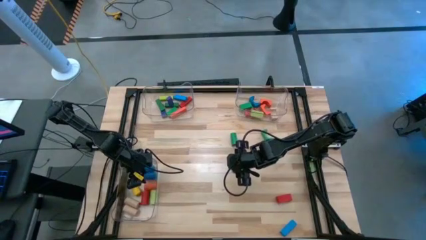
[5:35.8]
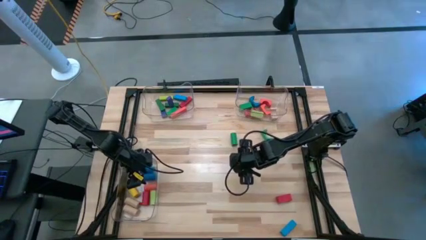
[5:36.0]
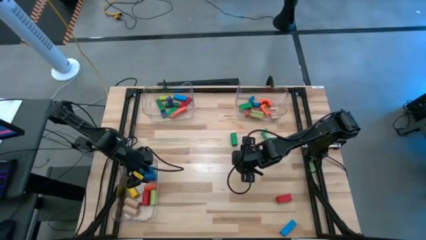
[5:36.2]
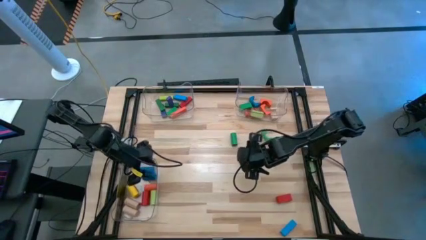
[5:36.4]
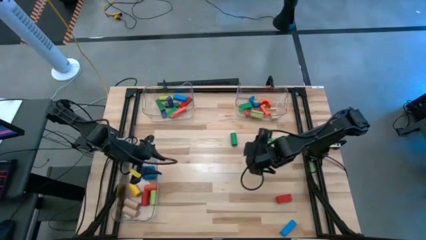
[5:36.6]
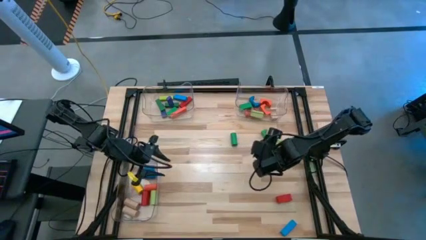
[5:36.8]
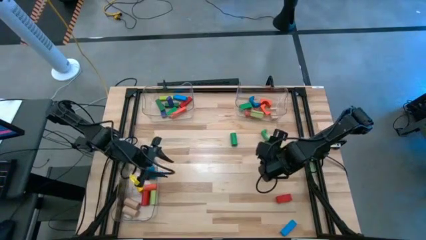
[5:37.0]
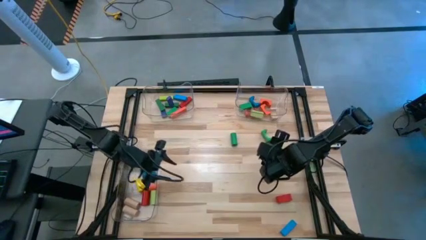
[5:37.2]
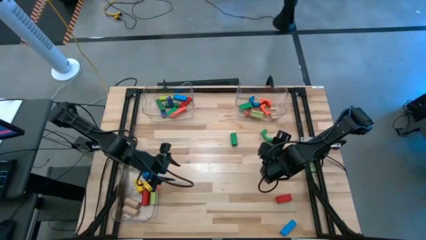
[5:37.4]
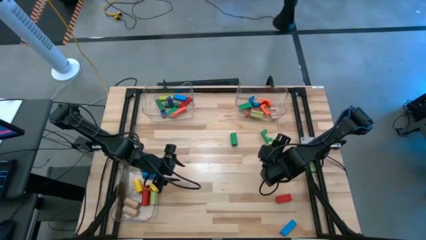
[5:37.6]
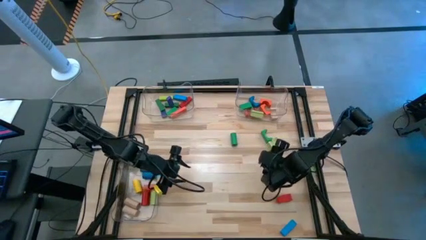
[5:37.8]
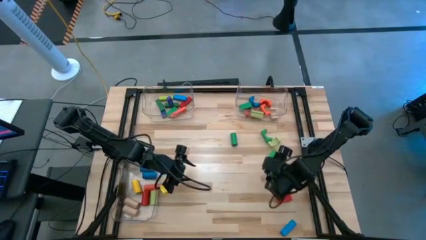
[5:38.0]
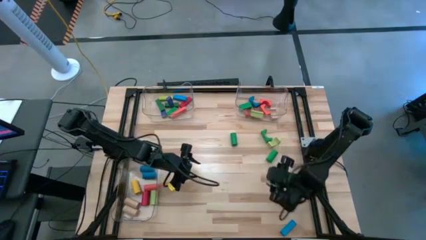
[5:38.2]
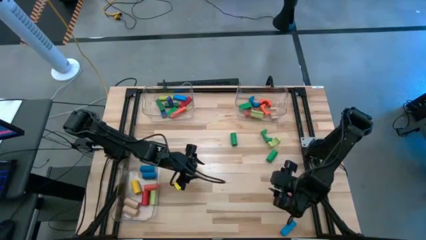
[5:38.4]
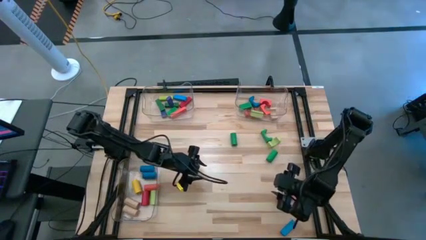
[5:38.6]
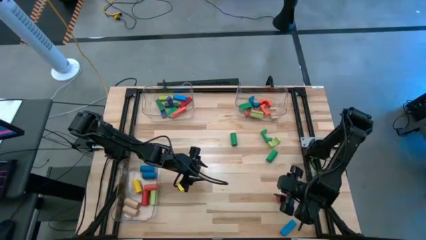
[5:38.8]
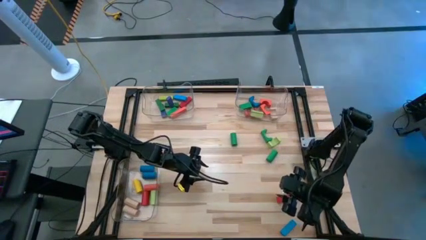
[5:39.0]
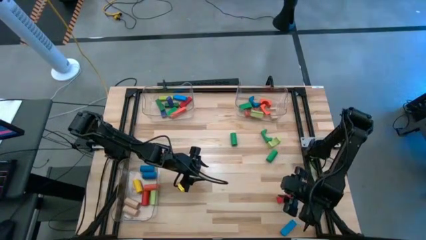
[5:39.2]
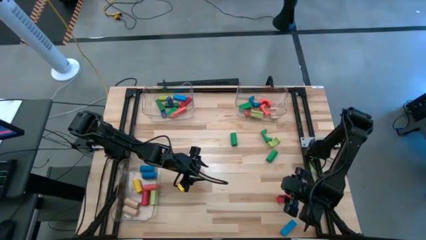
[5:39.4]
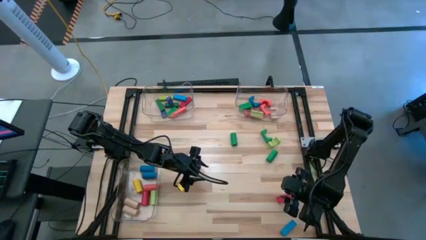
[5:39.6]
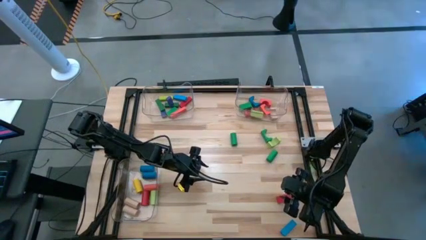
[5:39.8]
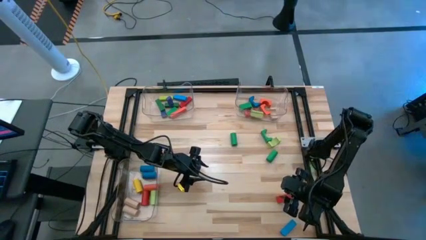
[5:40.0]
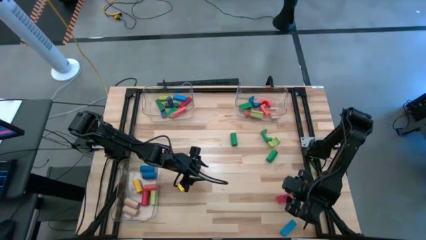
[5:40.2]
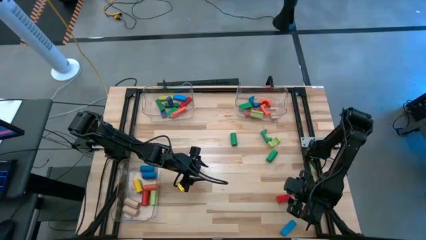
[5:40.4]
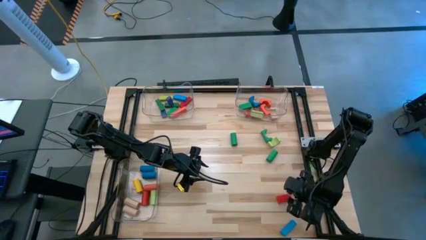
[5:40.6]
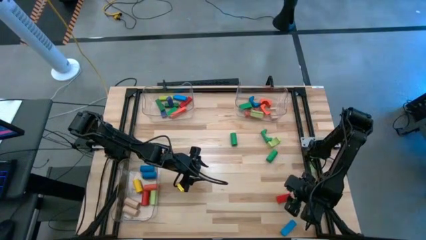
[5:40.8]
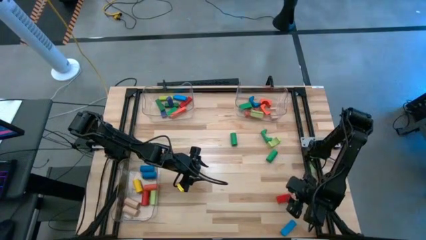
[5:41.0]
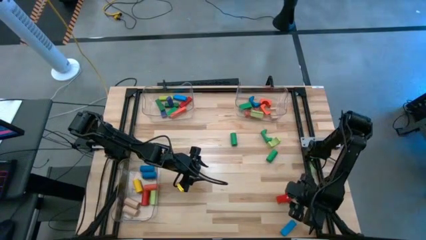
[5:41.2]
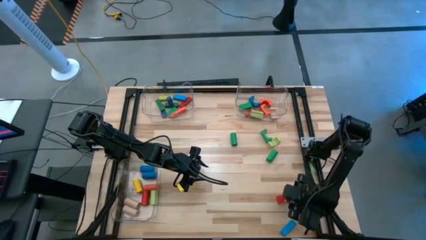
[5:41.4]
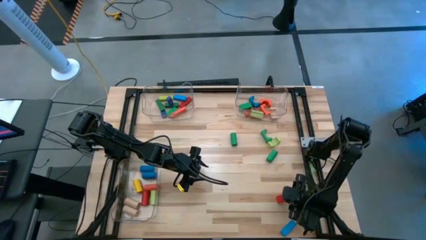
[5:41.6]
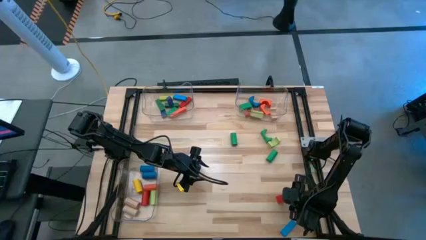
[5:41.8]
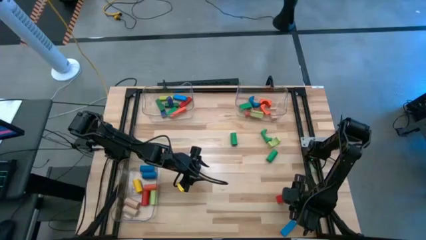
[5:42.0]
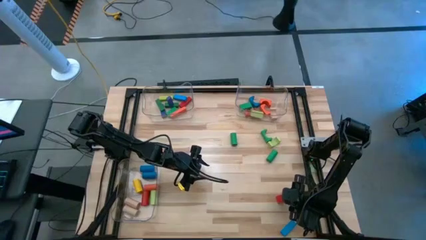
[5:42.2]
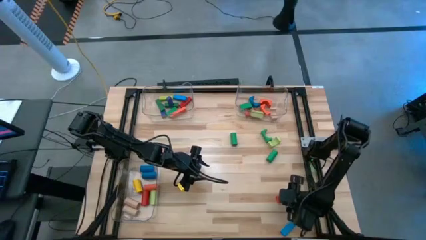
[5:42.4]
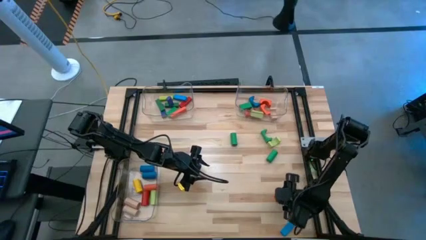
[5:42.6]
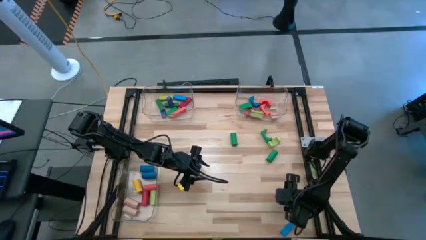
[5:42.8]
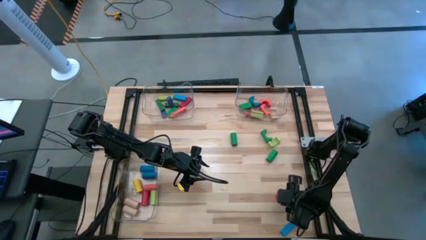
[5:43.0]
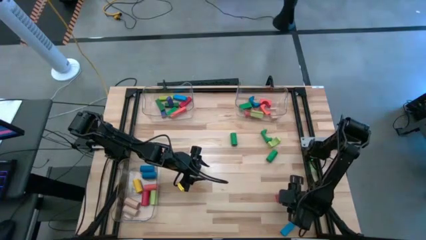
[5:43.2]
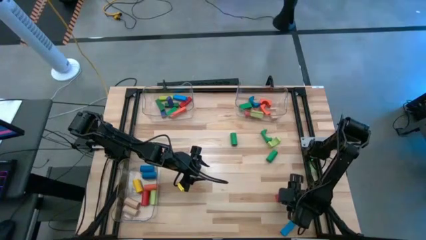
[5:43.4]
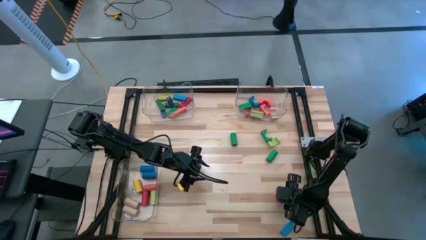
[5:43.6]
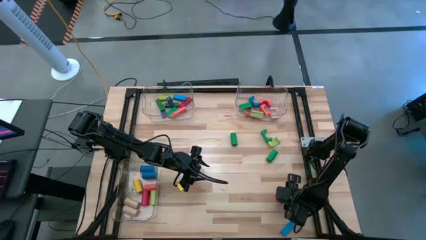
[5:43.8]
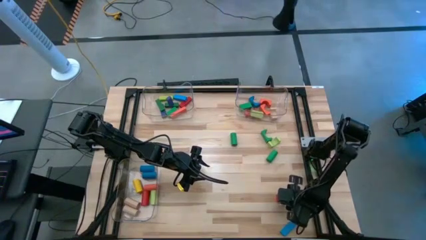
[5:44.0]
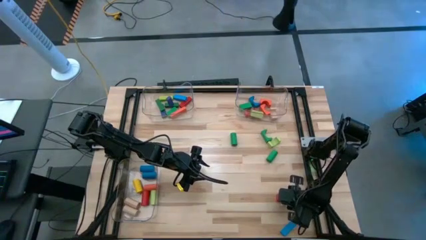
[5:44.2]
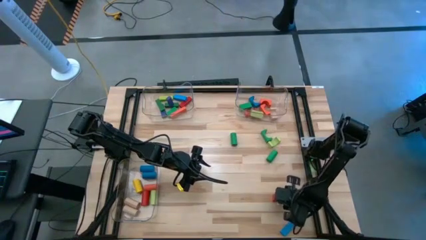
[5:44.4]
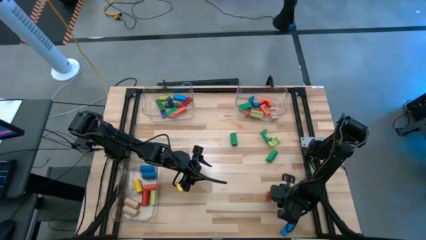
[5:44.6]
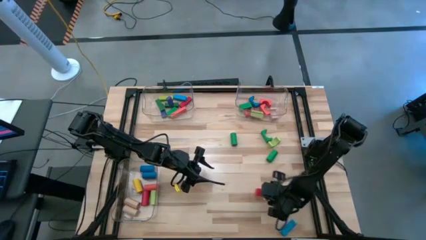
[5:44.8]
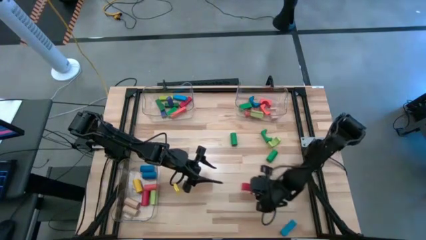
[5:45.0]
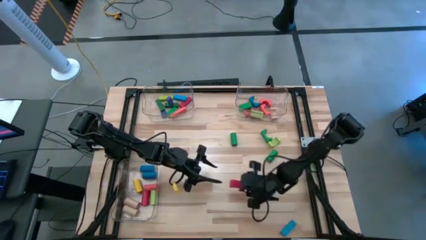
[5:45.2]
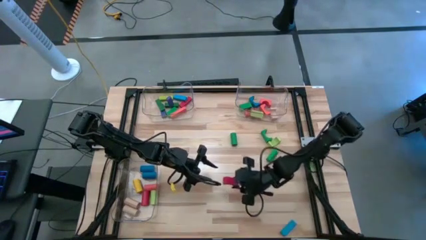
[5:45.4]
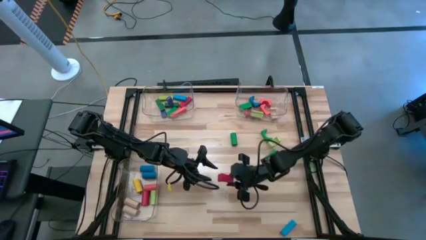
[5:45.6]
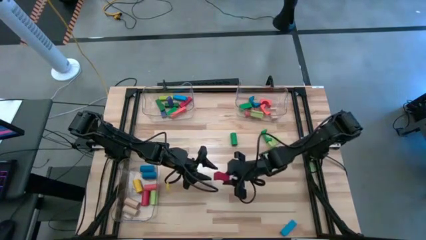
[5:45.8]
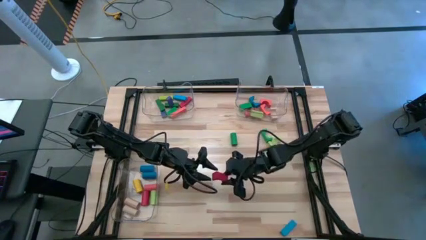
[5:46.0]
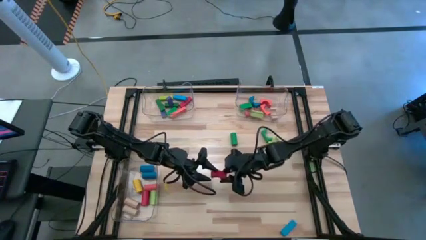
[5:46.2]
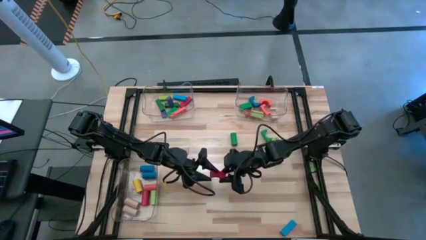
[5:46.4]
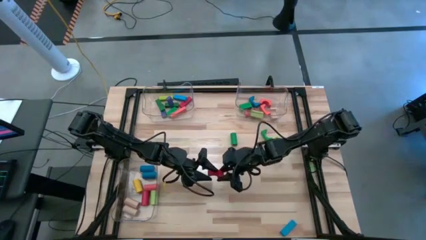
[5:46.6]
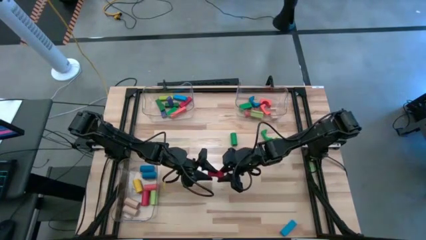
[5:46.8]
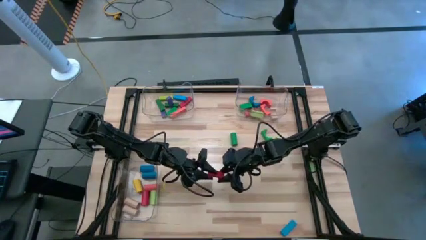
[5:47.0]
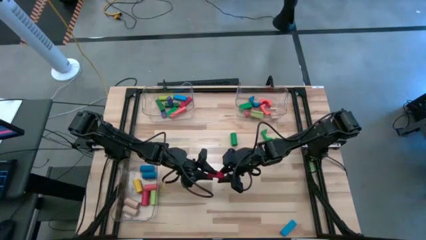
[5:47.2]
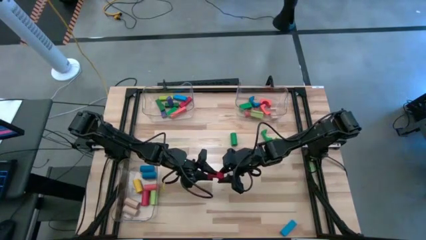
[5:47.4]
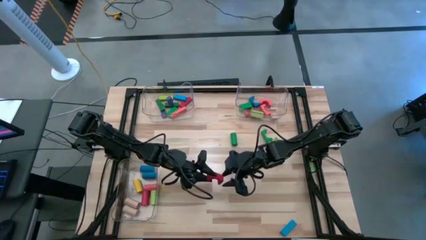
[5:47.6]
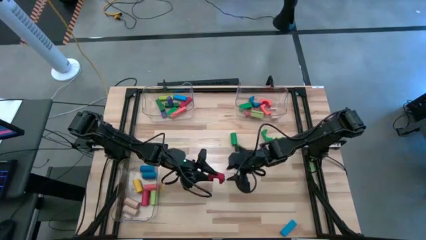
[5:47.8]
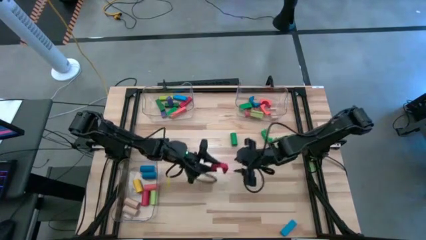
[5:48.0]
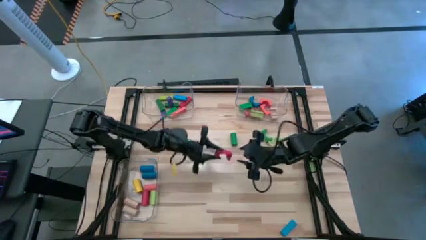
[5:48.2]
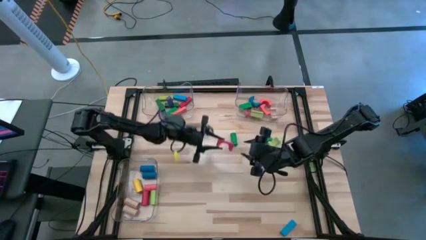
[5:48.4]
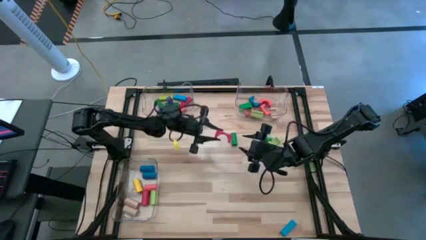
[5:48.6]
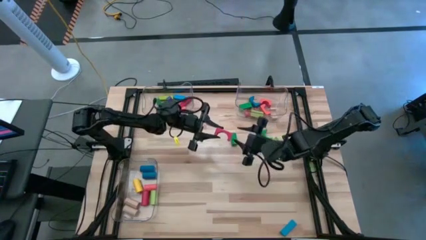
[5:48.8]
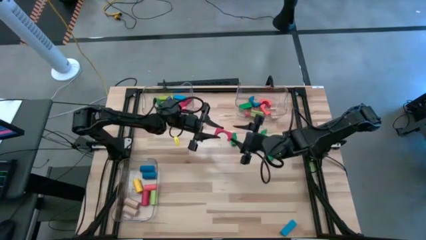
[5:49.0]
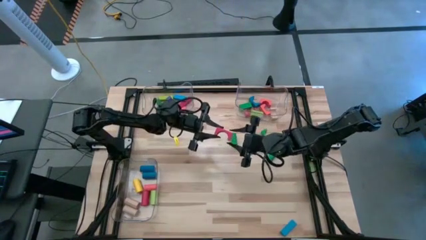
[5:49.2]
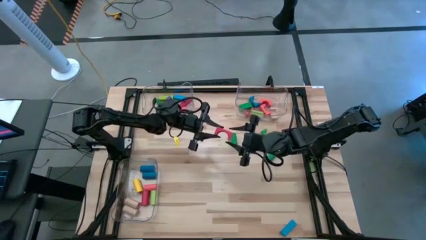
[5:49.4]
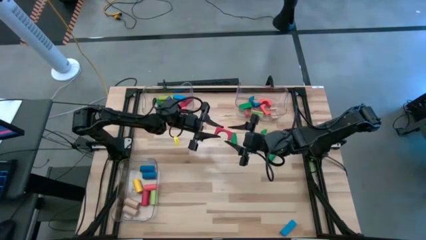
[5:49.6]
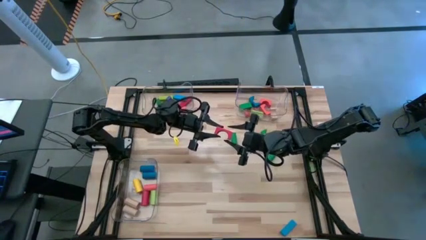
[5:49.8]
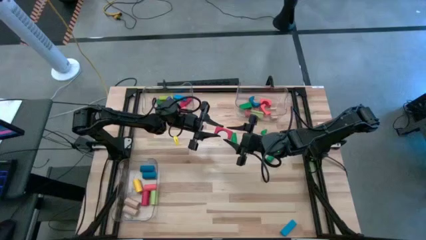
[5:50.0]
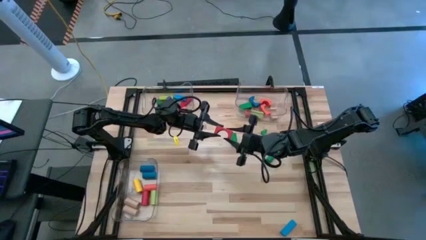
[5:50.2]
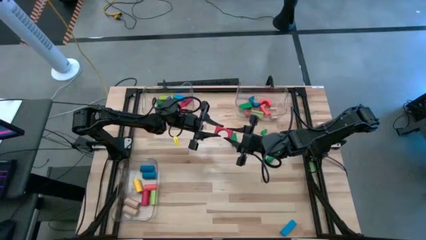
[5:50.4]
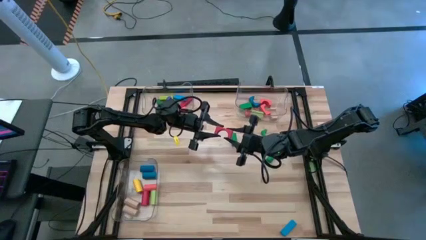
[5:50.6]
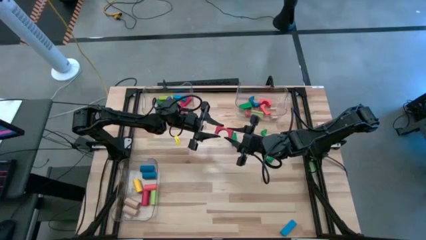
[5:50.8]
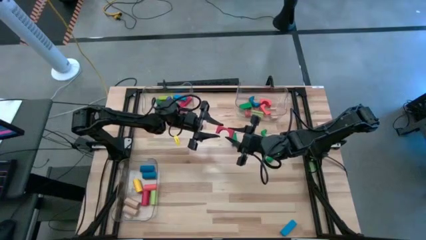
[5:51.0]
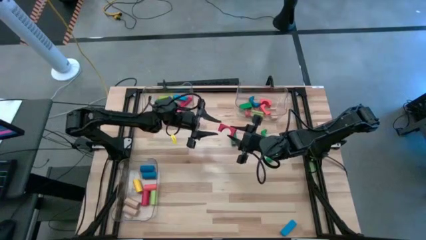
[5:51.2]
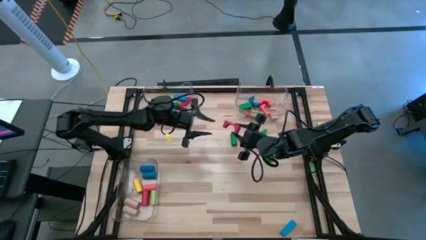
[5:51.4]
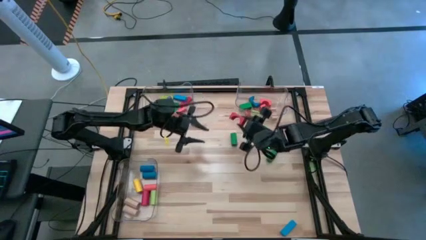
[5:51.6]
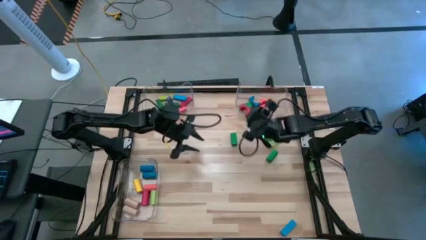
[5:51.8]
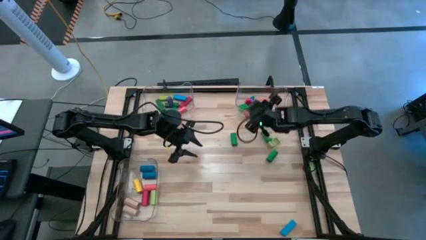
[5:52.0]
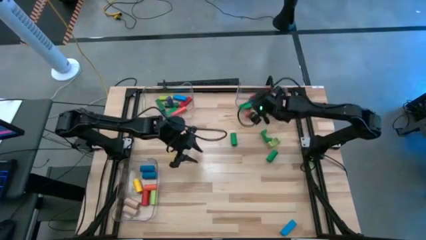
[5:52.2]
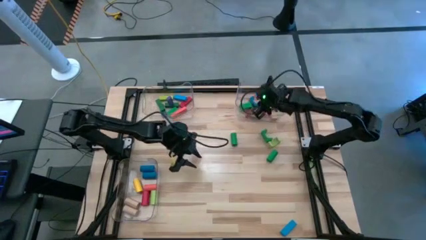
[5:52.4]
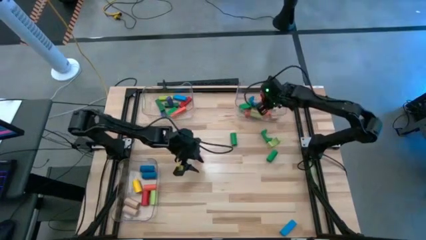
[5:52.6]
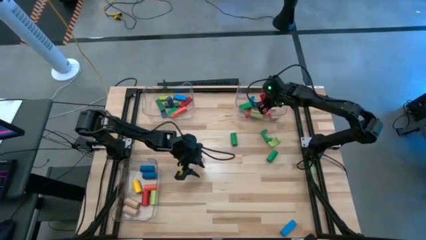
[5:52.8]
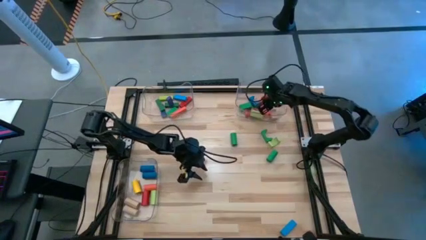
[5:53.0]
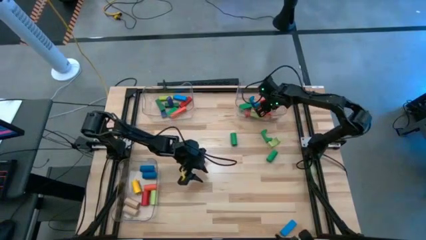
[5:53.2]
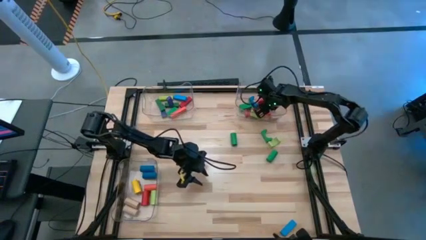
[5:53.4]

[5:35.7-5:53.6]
Task: Sort blocks by size
Put the red arch block into the top right transparent bin
